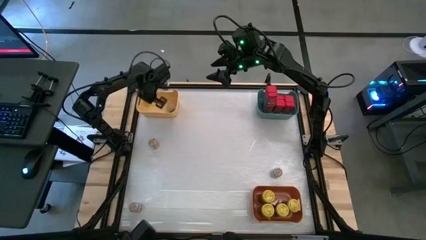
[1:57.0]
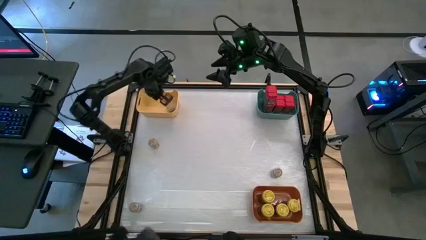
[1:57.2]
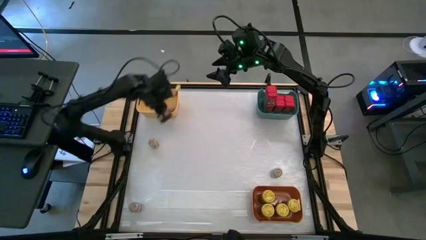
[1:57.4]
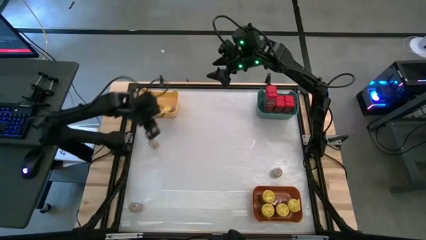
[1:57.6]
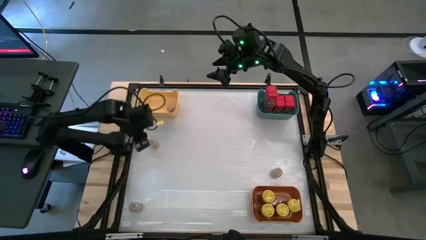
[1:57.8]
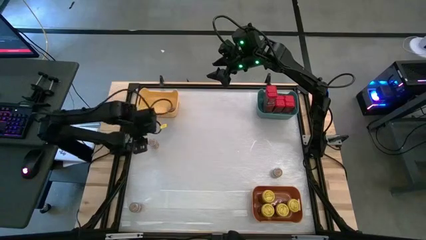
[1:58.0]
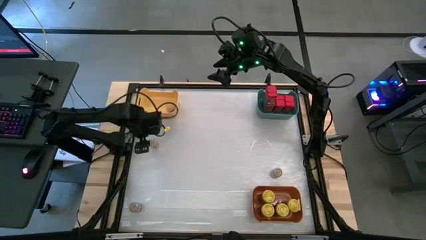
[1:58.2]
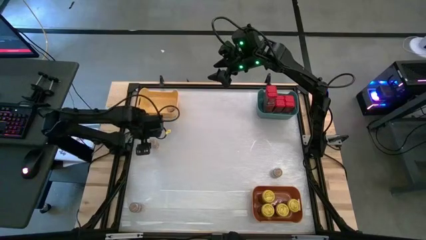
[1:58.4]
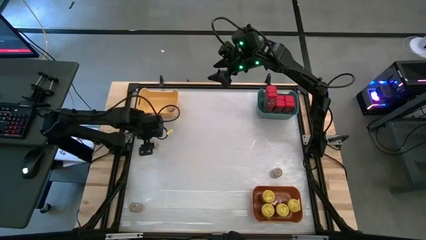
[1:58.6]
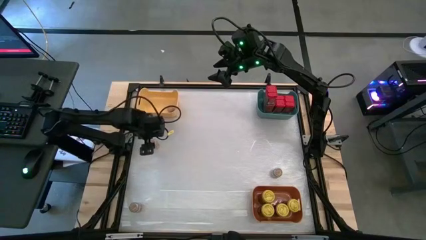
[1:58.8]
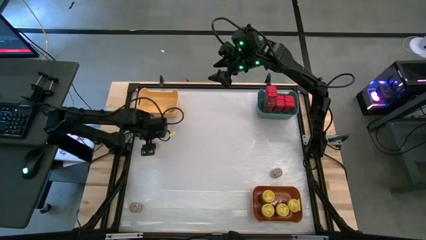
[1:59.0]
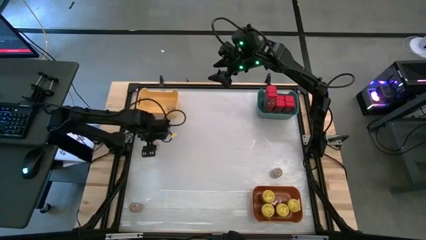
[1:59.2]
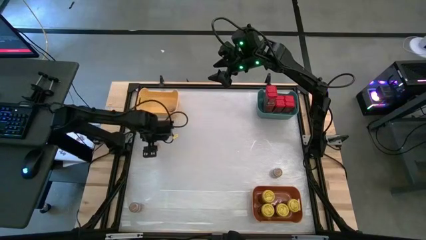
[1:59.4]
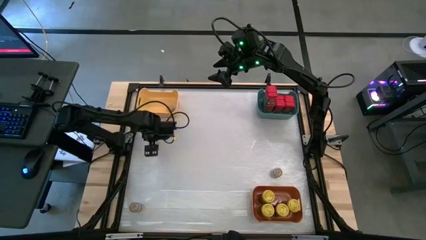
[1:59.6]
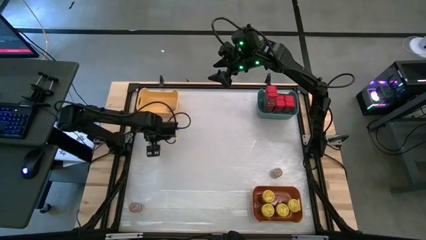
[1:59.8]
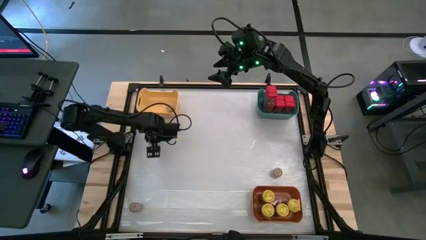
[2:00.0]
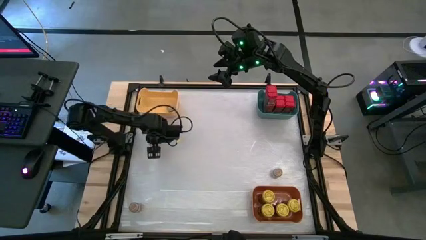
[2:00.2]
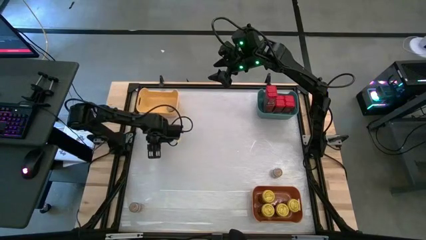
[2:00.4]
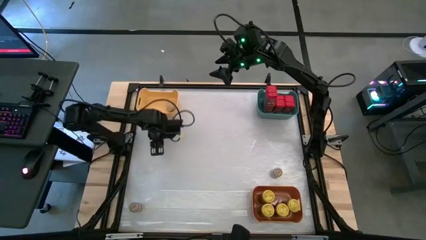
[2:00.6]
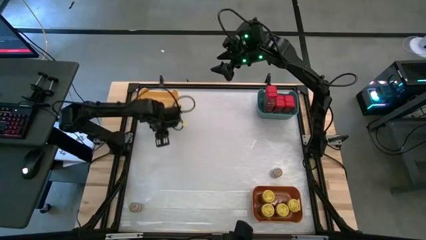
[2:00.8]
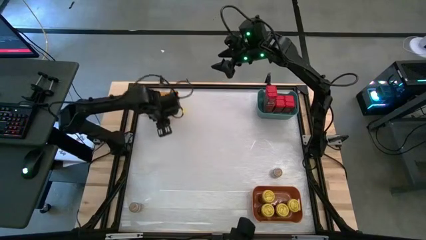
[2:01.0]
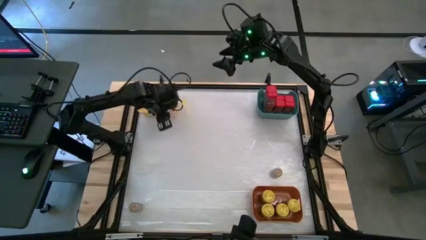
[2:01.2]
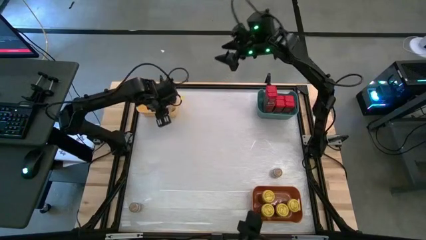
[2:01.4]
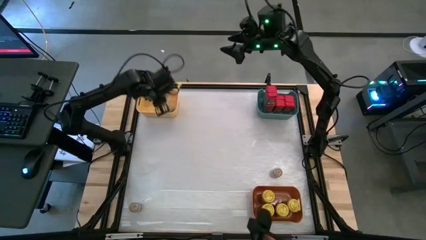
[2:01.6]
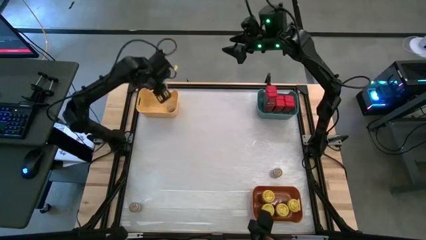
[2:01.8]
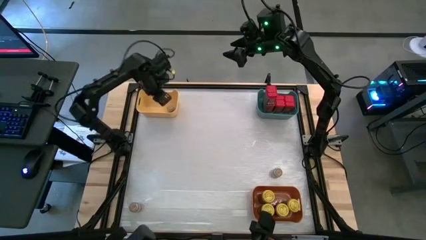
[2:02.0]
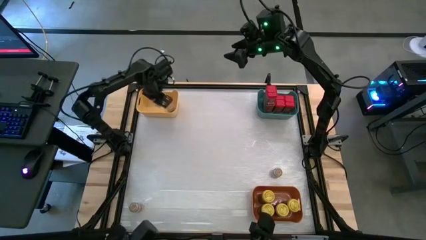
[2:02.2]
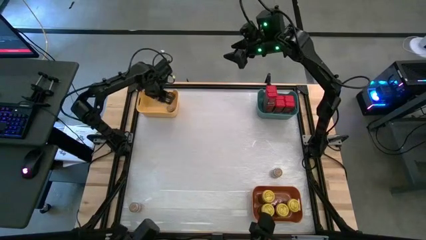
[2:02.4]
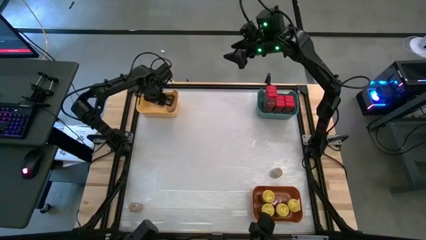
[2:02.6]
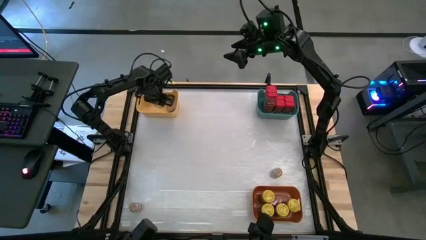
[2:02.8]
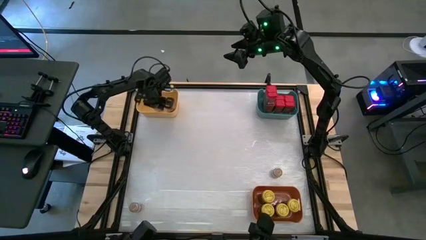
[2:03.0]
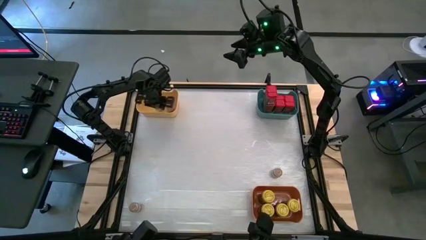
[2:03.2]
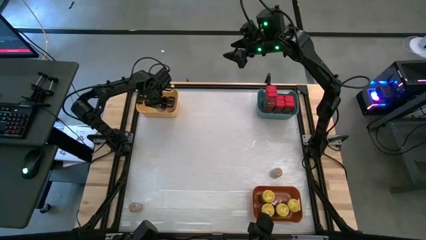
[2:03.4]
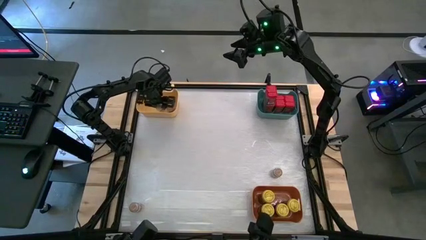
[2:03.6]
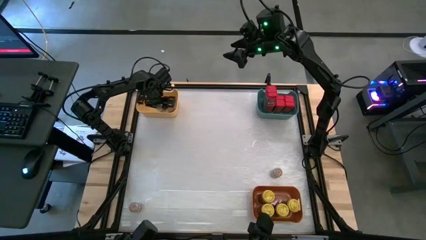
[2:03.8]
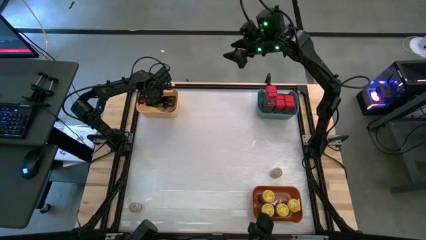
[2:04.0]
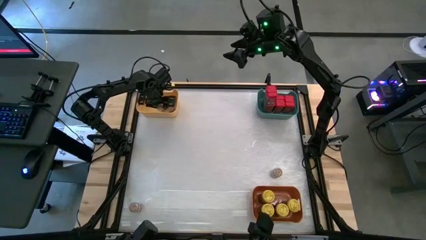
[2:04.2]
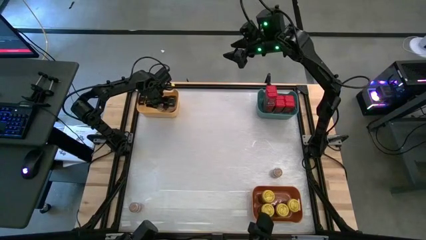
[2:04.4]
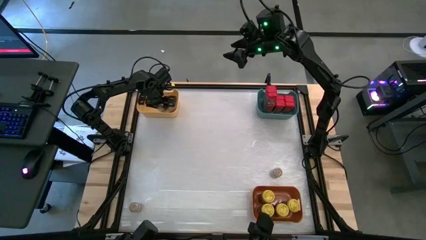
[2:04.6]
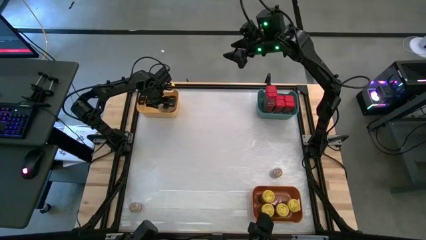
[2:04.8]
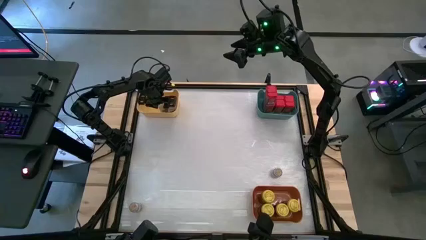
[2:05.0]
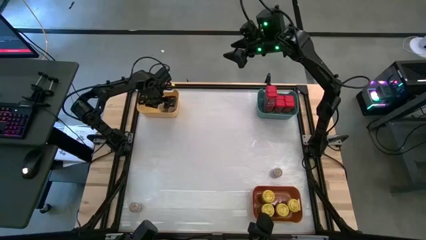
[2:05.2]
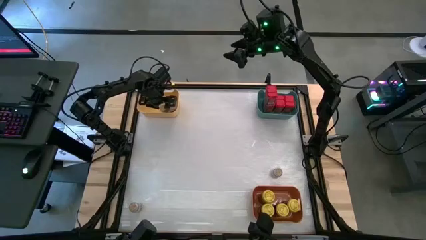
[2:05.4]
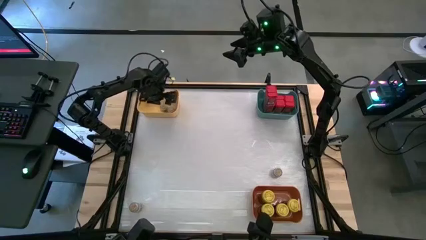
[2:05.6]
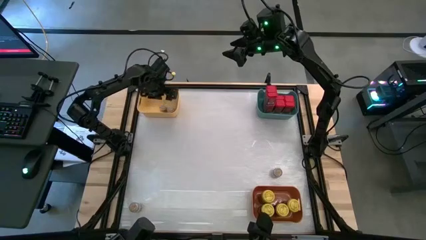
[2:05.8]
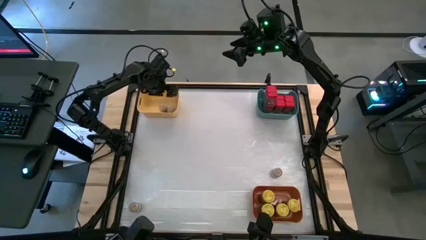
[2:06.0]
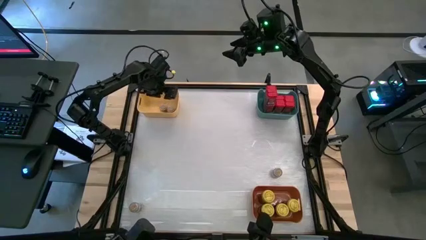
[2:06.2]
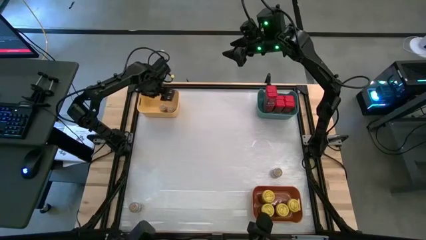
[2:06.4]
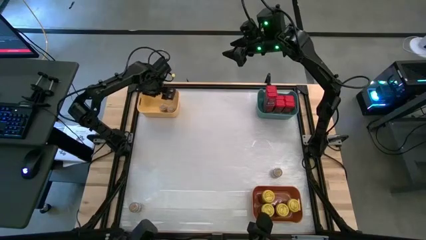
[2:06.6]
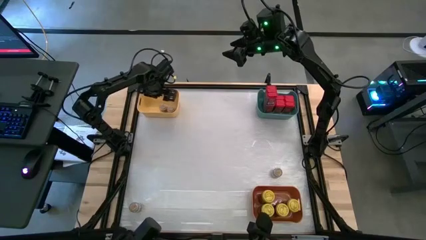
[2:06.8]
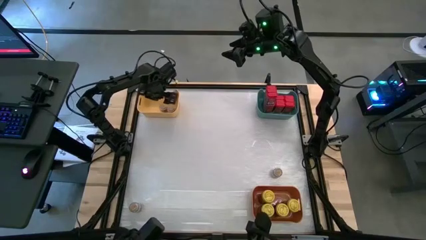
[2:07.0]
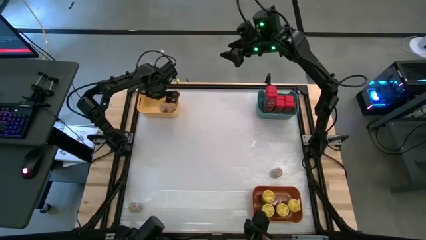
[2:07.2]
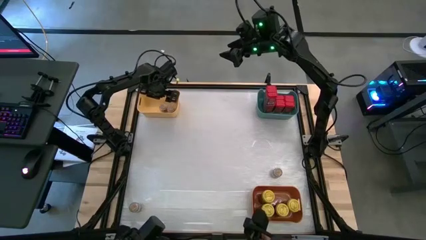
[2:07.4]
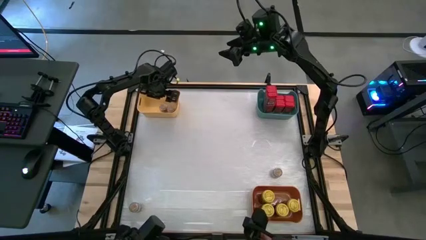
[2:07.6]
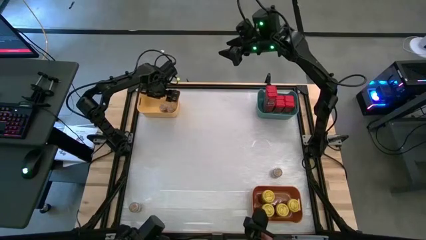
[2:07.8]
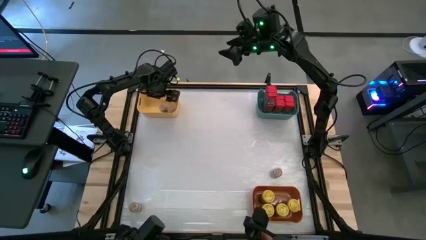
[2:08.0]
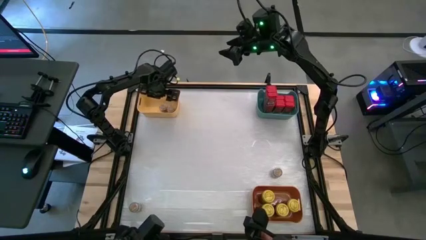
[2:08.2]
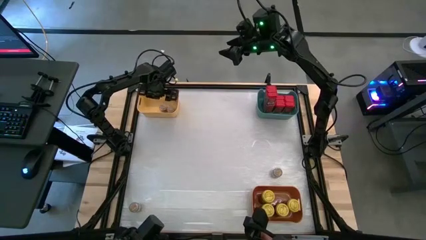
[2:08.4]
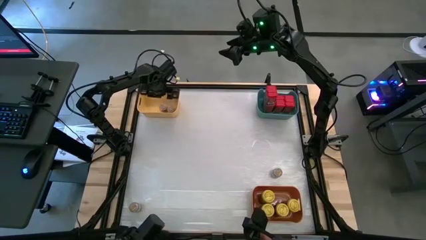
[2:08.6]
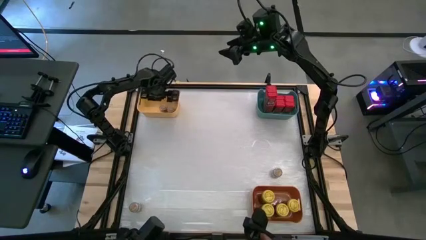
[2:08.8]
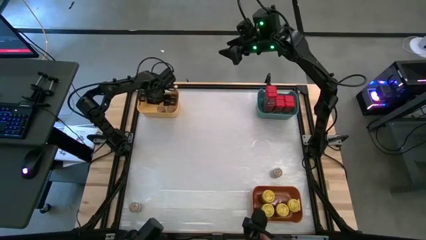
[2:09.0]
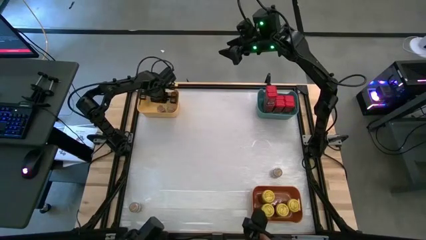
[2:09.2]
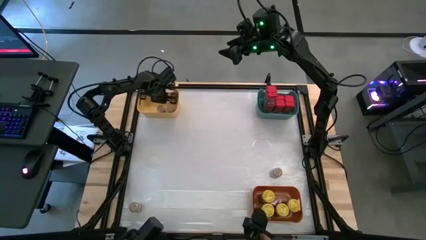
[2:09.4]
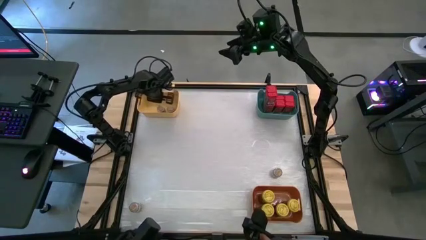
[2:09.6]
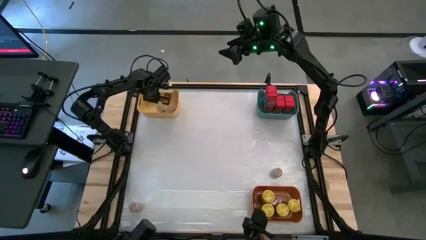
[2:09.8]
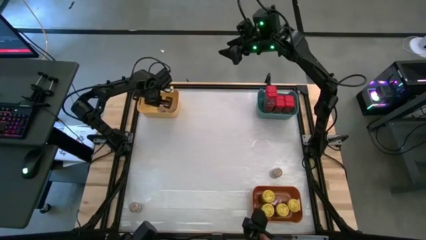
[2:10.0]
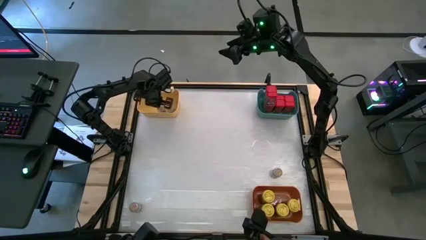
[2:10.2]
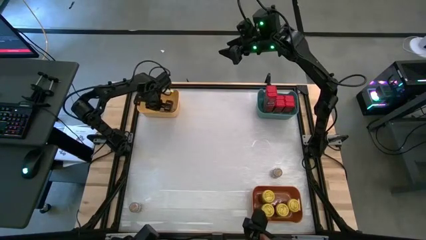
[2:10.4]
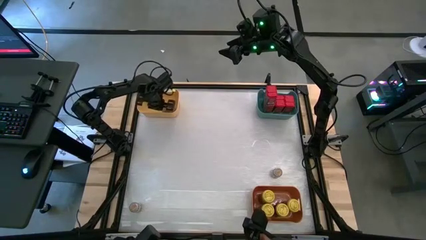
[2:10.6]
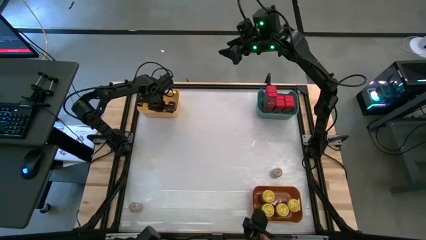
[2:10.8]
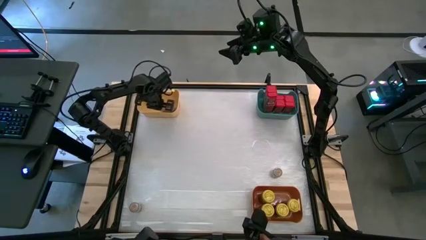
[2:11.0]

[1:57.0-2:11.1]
Task: Sort spices by type
Put the top brown seasoning bottle into the yellow bin

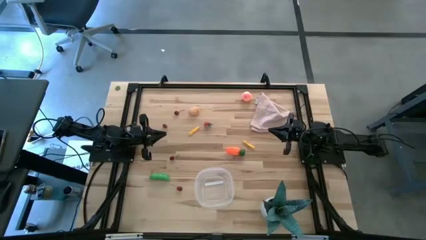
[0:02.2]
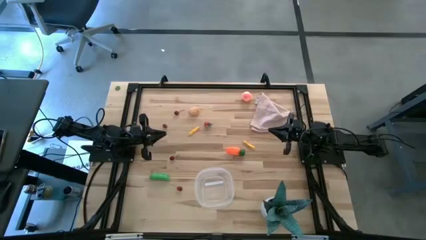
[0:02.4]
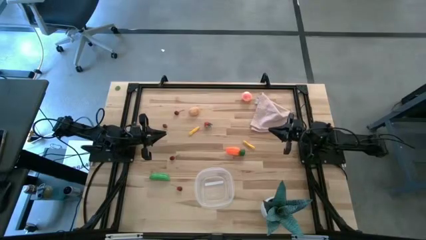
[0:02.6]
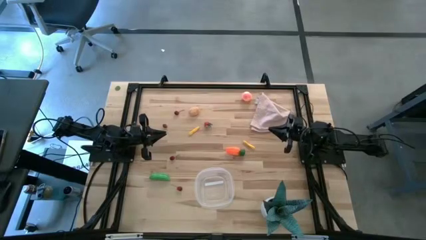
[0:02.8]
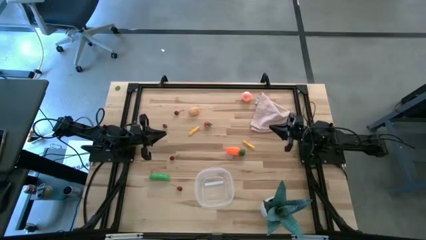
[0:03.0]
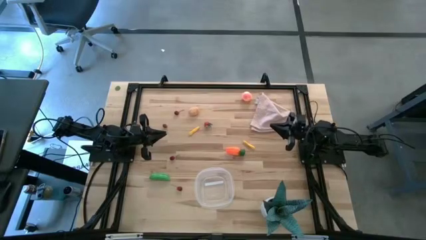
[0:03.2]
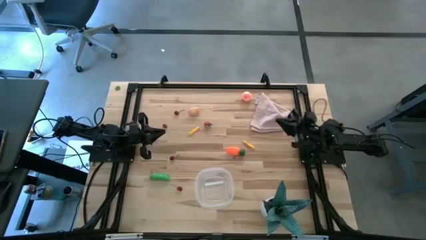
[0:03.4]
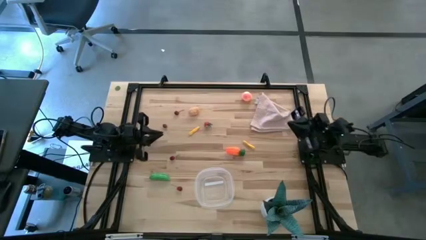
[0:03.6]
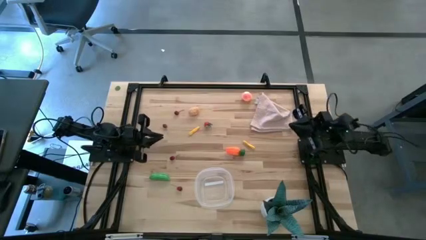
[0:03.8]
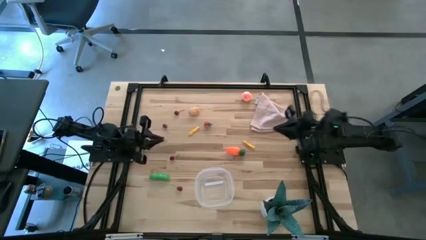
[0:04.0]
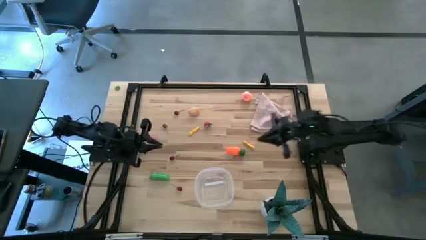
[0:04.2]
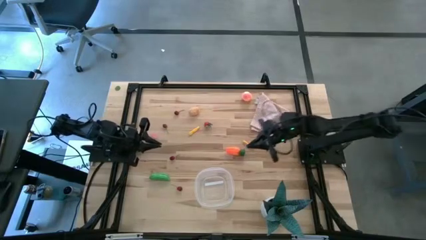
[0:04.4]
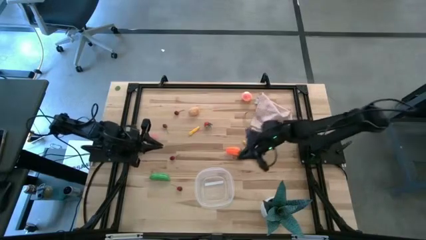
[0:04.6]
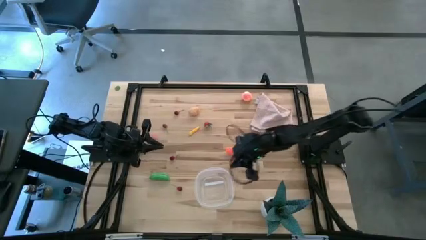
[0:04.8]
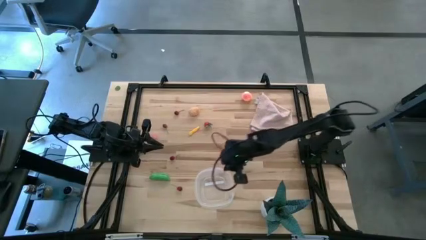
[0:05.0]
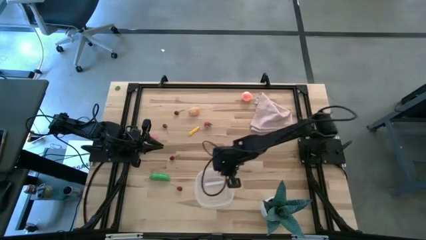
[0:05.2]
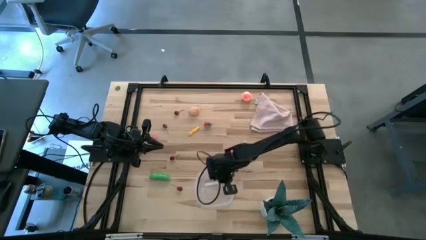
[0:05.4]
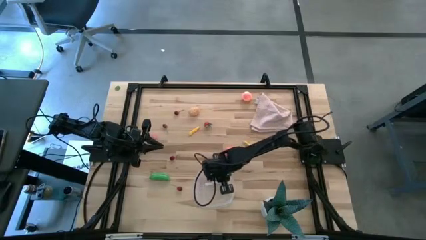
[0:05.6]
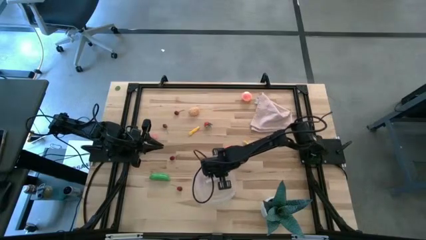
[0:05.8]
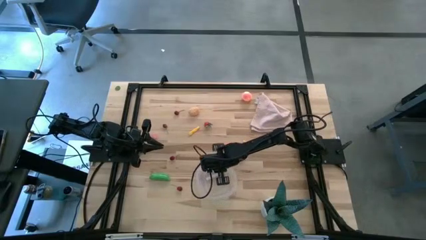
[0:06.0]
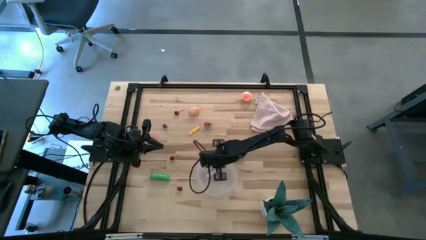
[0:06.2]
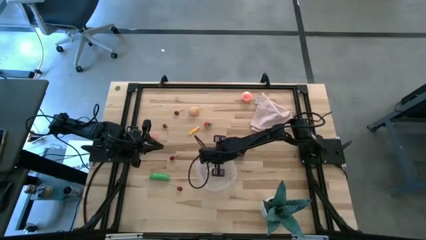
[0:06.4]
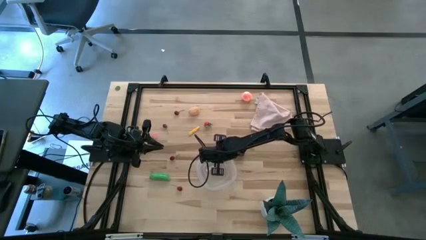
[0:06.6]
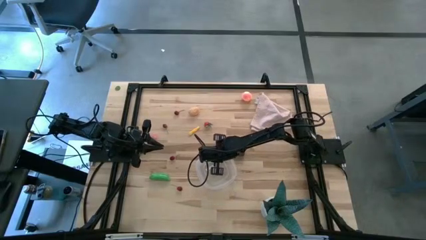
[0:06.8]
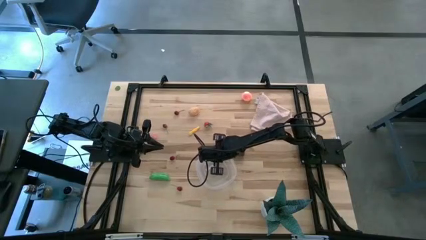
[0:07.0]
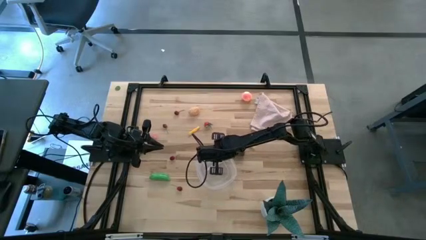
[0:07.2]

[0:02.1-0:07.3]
Task: Pick and placing Produce into tupperware
Prepare the transparent bin
